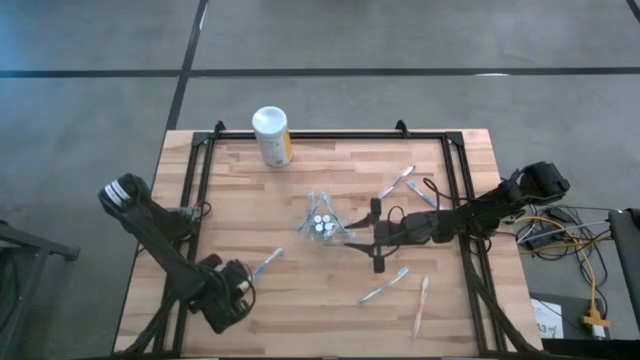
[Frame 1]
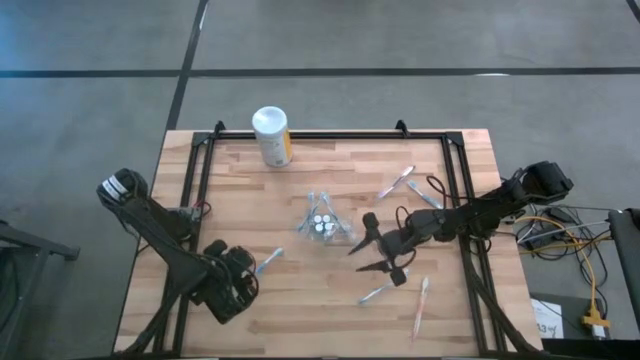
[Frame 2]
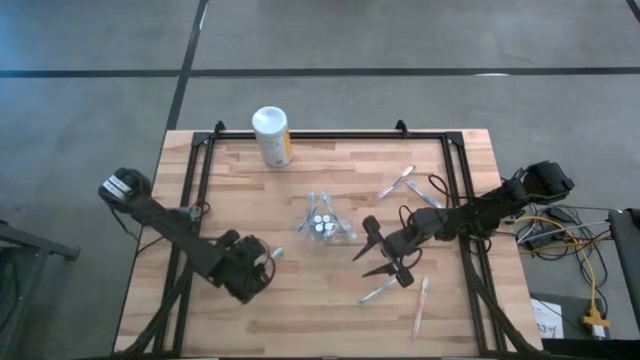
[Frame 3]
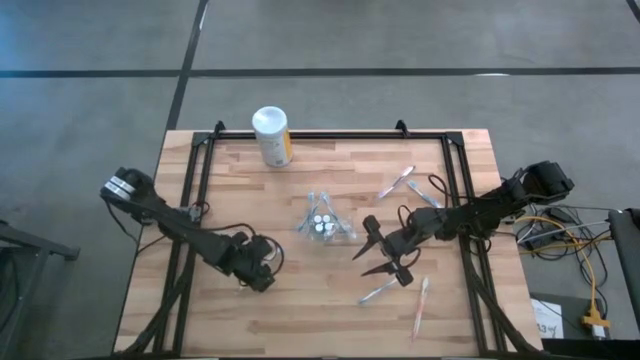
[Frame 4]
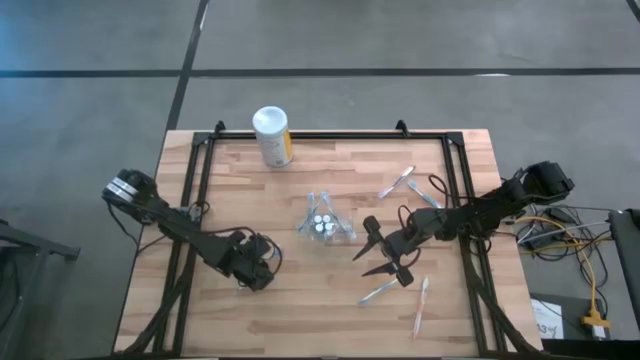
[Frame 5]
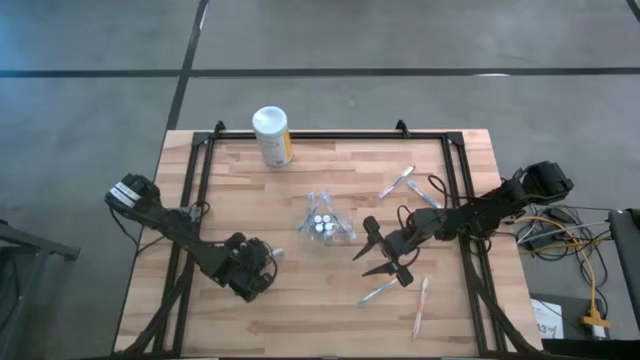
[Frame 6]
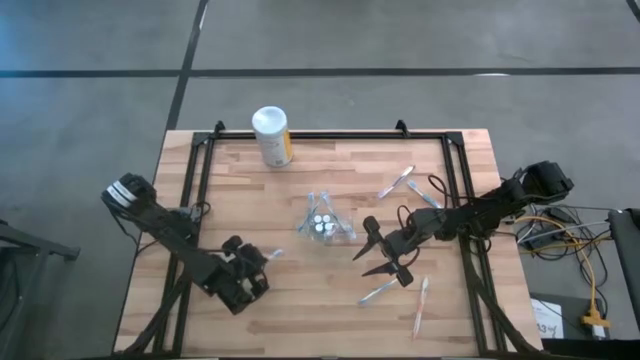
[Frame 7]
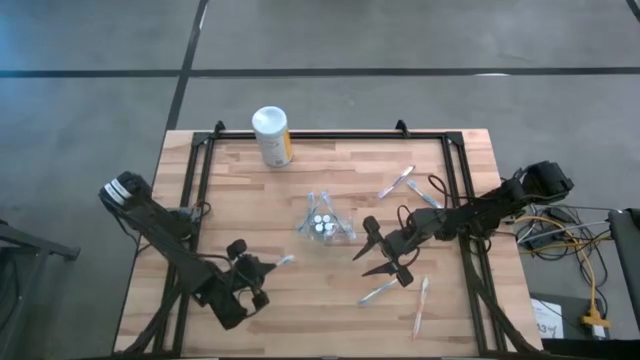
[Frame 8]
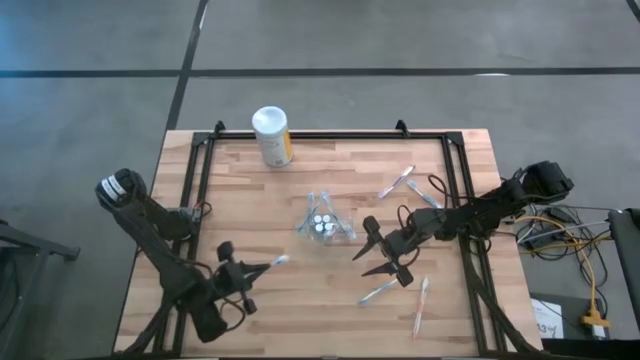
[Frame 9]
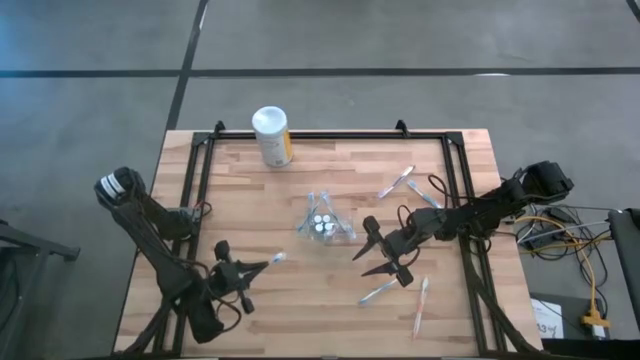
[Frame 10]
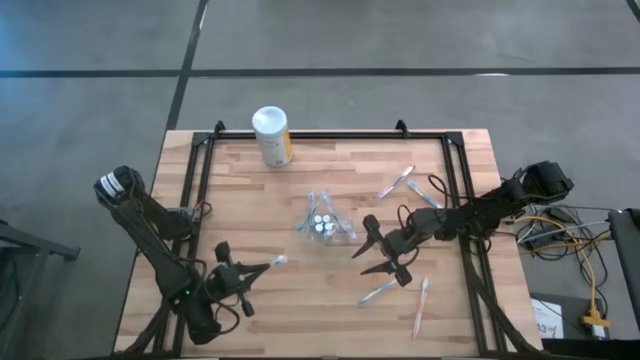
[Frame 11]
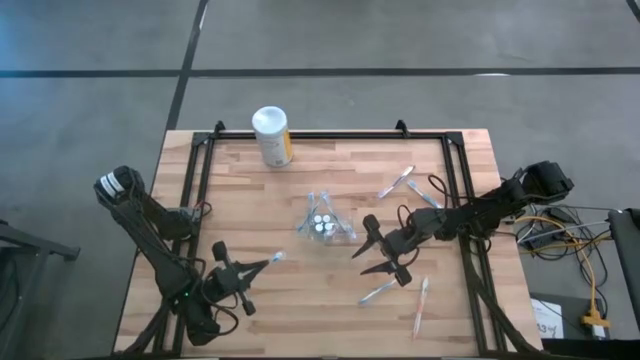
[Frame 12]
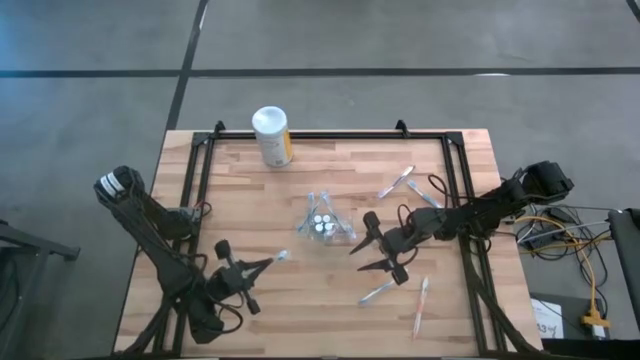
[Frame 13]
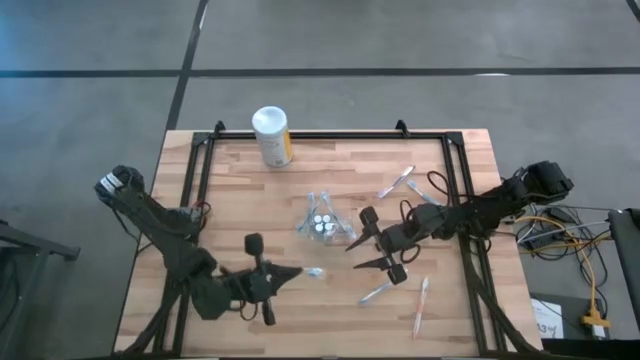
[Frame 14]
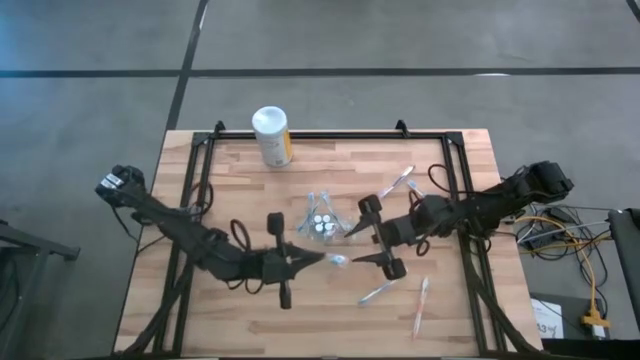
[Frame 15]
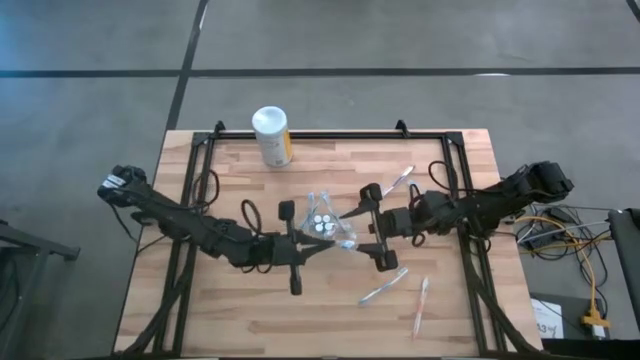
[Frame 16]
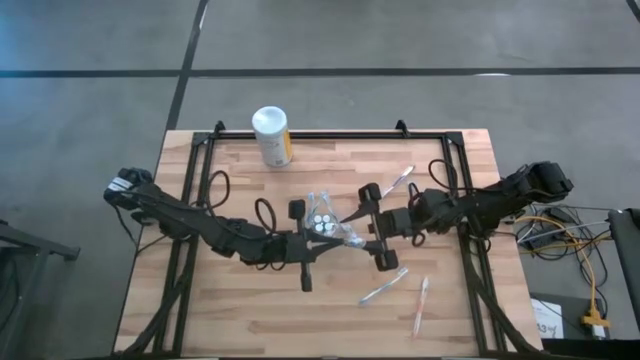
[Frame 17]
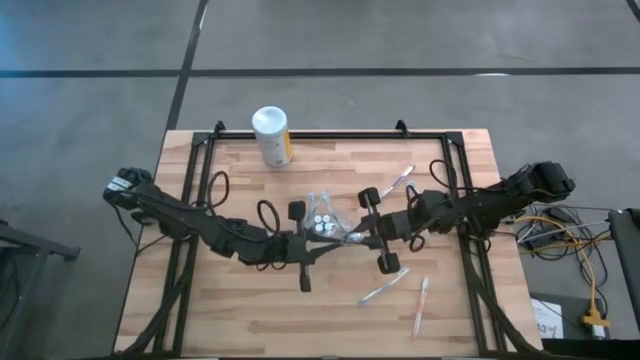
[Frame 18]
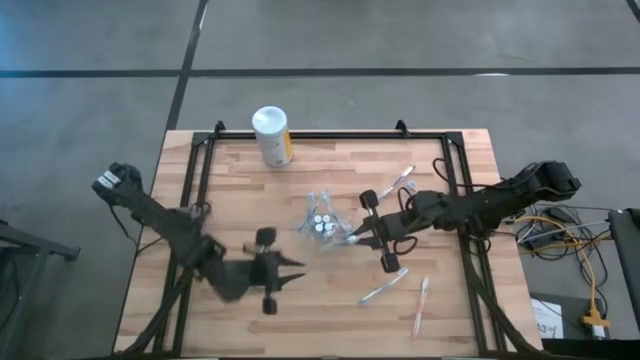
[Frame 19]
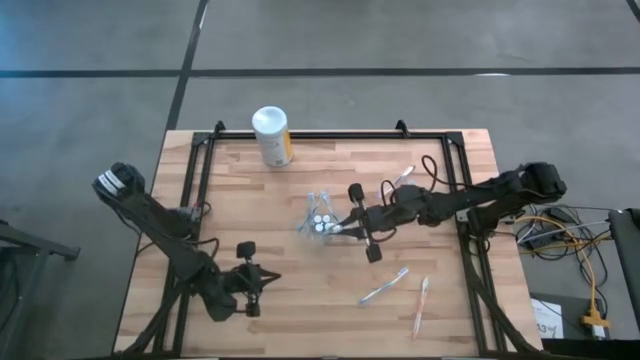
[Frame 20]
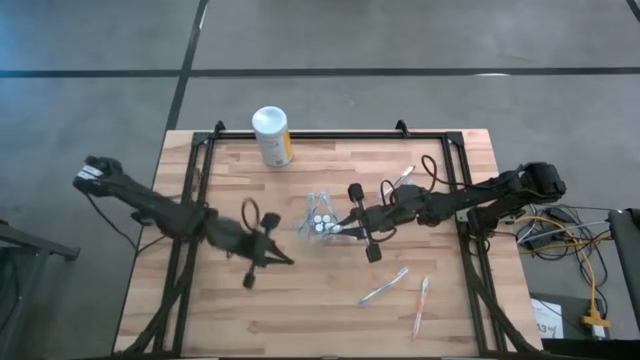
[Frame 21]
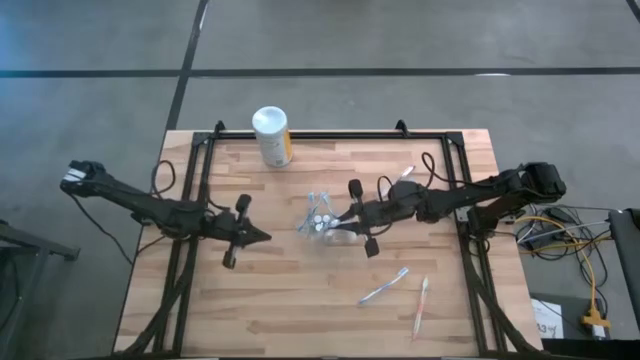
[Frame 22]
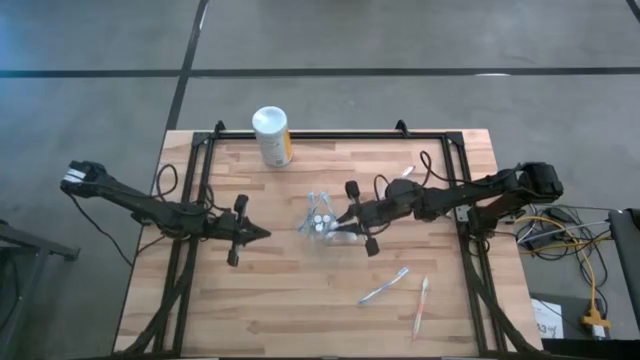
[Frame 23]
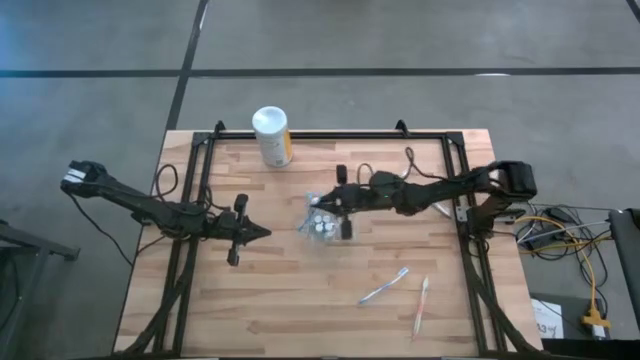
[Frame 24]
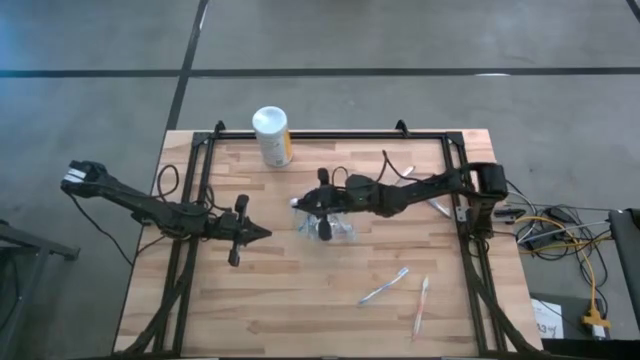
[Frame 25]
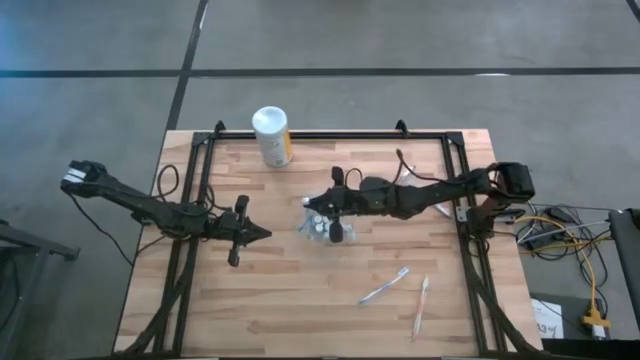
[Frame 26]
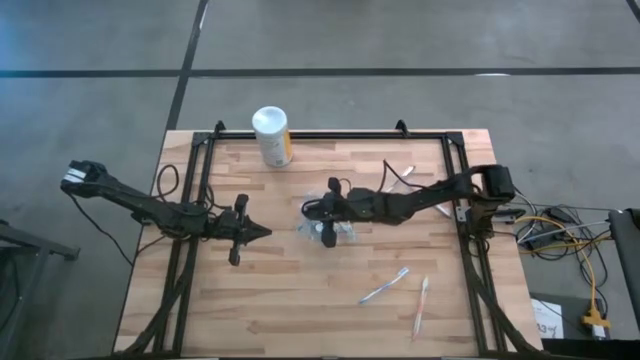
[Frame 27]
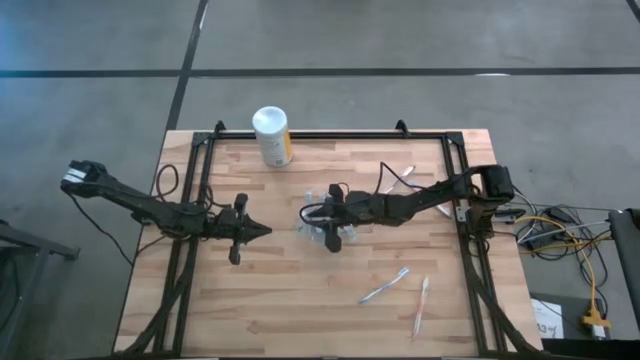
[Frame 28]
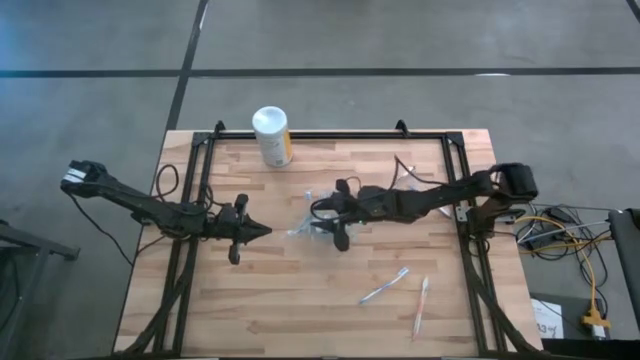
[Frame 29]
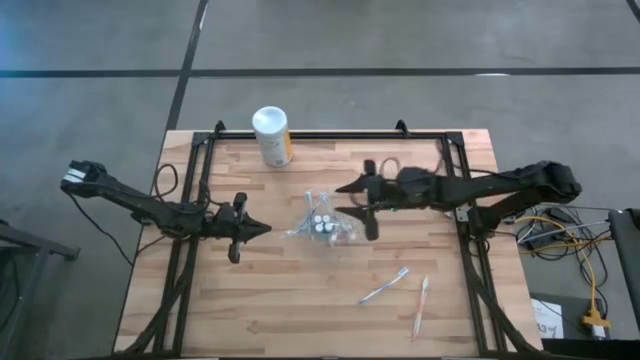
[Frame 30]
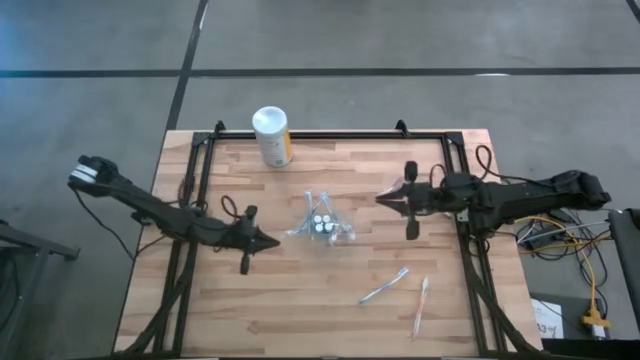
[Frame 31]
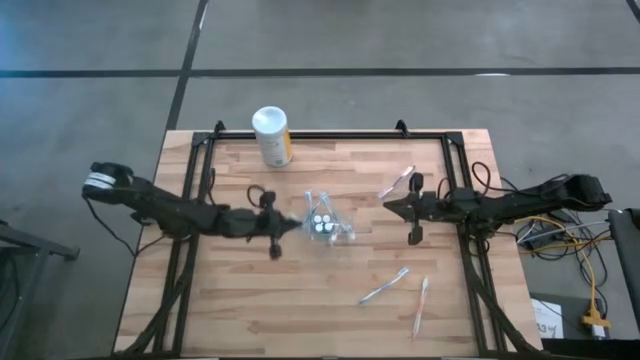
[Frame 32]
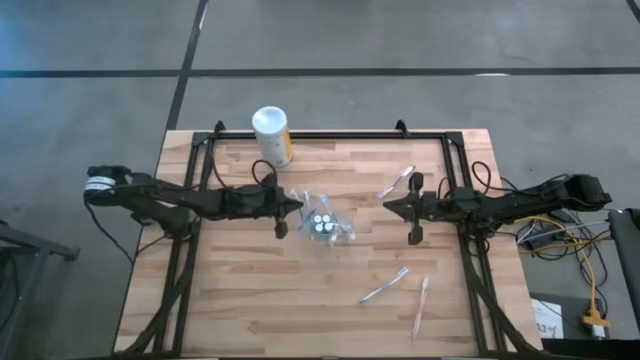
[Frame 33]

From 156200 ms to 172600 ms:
Task: Pick & Place toothbrushing station
Put the blue toothbrush into the transparent organizer

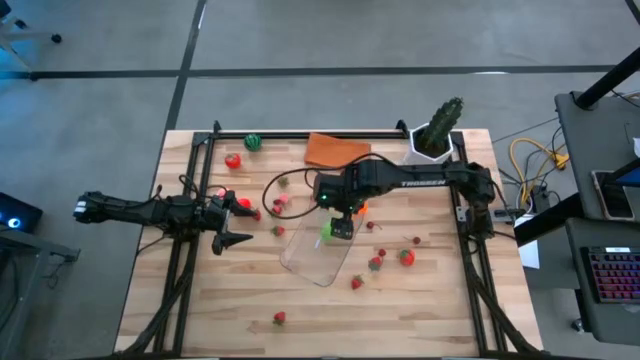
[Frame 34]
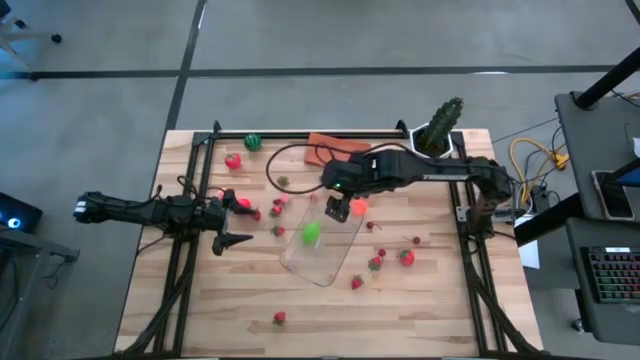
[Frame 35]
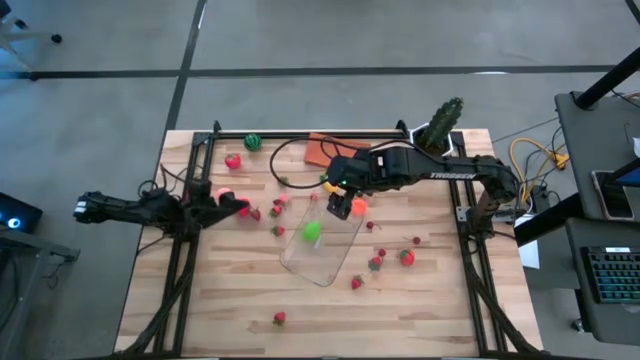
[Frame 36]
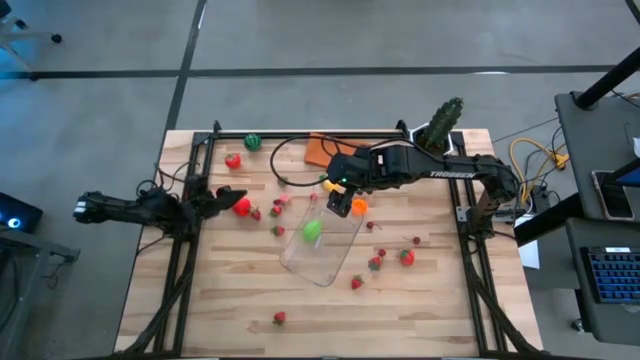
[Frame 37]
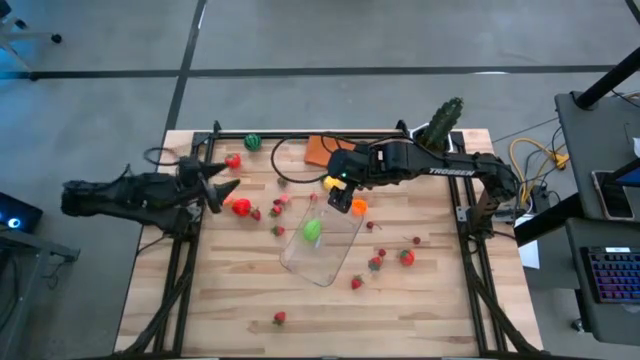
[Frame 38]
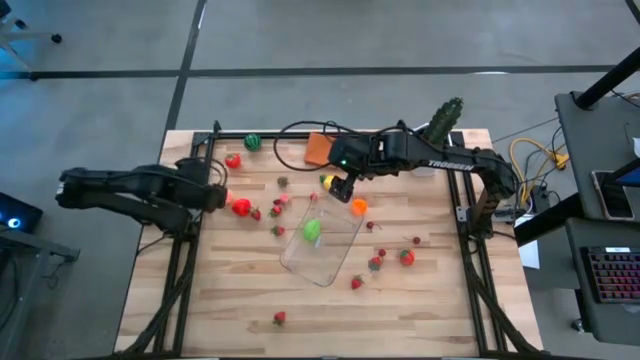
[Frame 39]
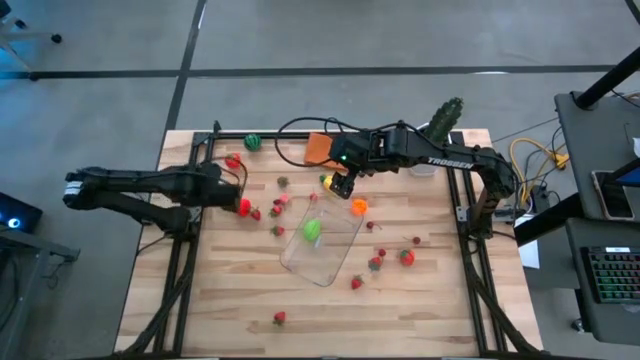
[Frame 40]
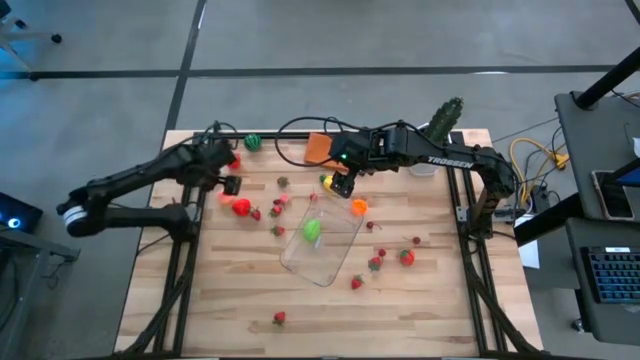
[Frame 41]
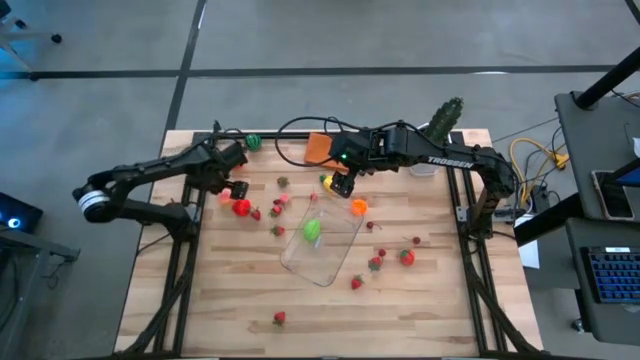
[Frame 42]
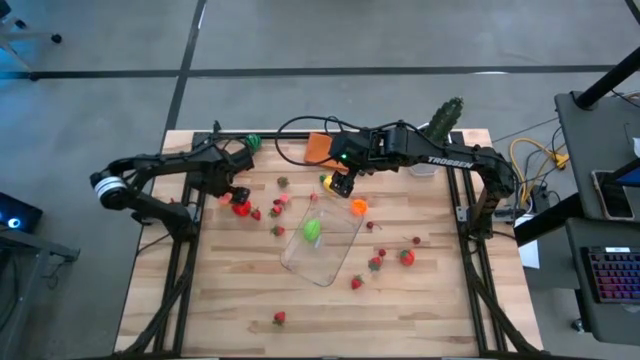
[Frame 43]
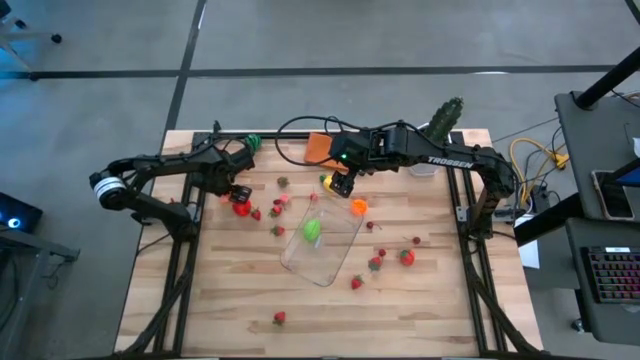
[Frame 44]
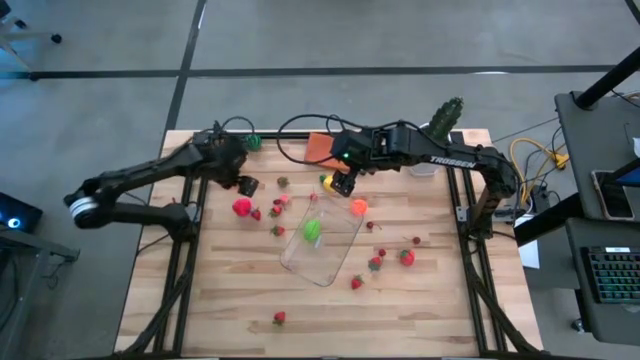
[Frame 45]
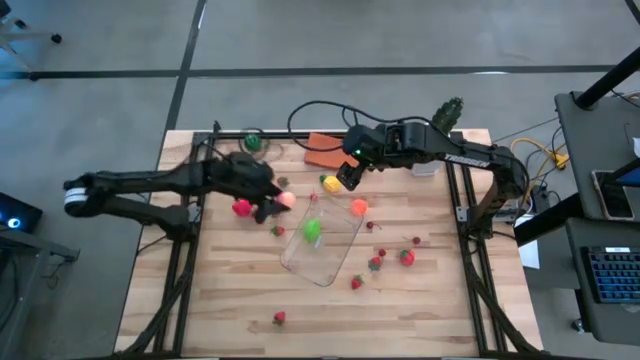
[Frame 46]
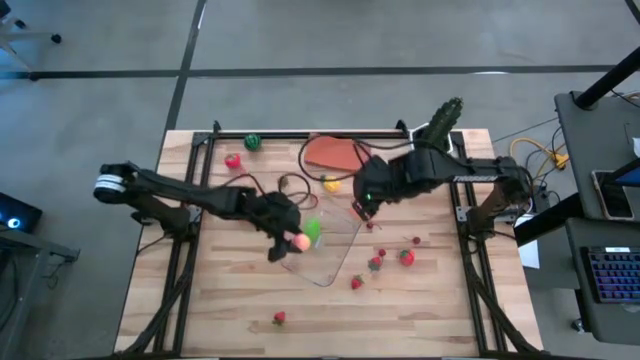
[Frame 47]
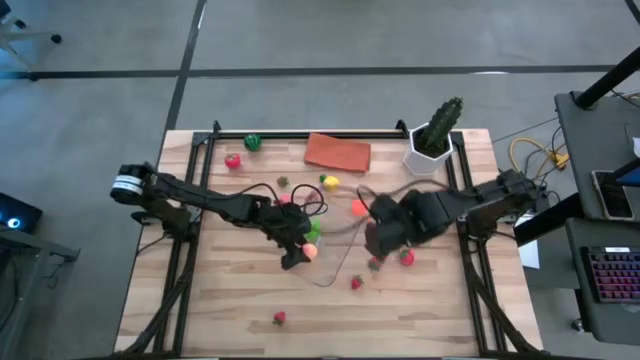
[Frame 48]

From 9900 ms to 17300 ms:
Task: Pick and placing Produce into tupperware
Put the peach into the transparent bin
